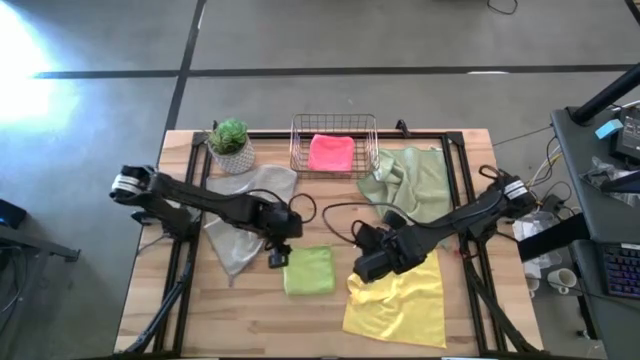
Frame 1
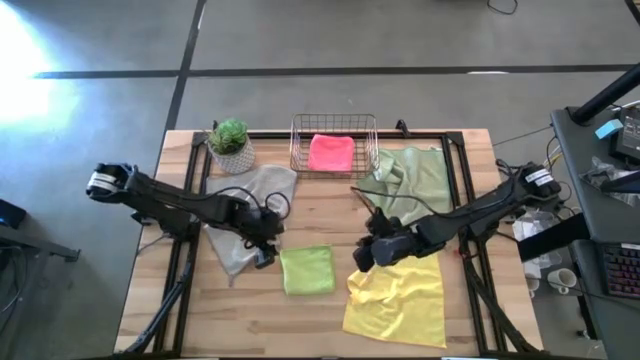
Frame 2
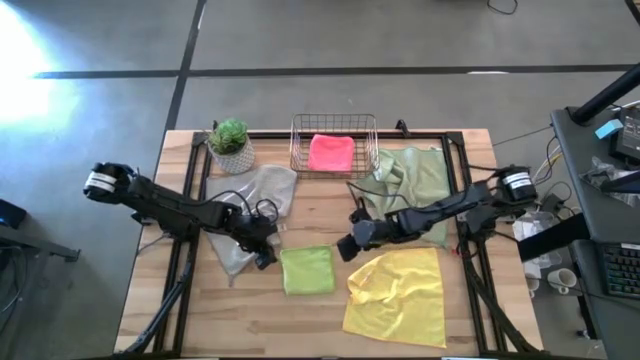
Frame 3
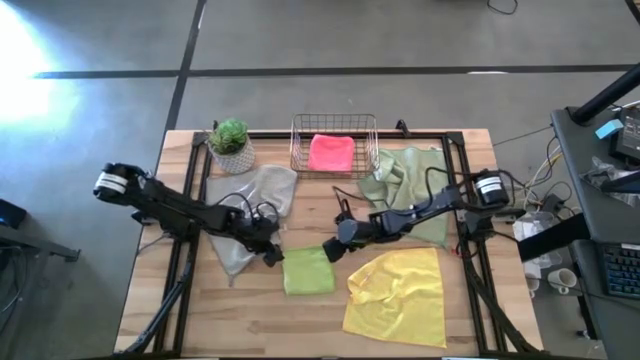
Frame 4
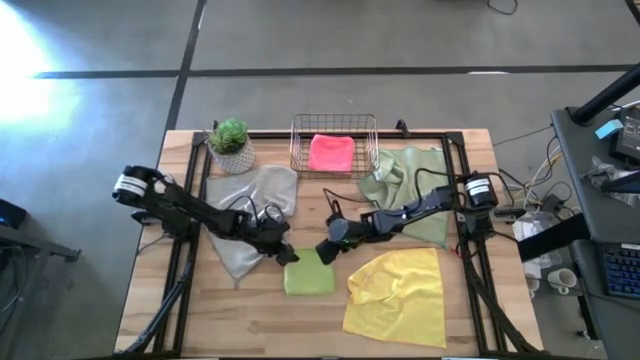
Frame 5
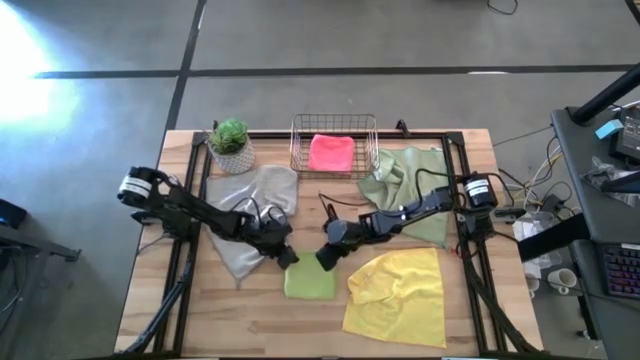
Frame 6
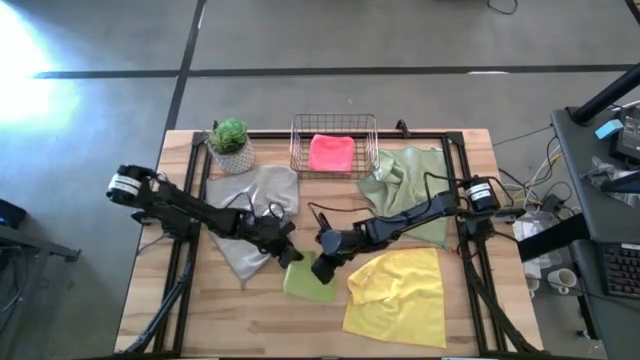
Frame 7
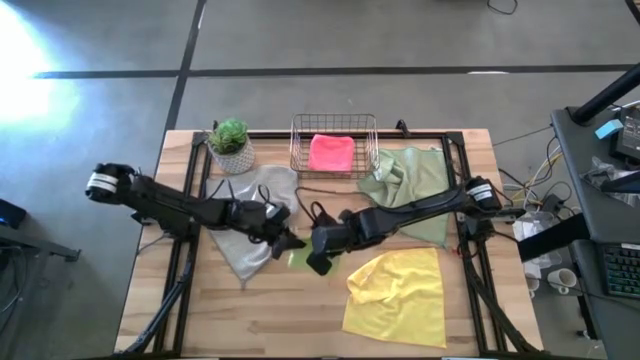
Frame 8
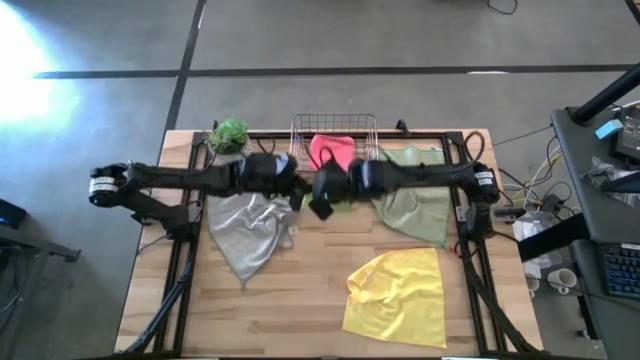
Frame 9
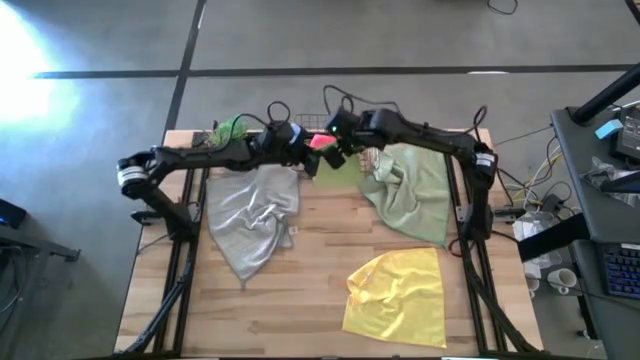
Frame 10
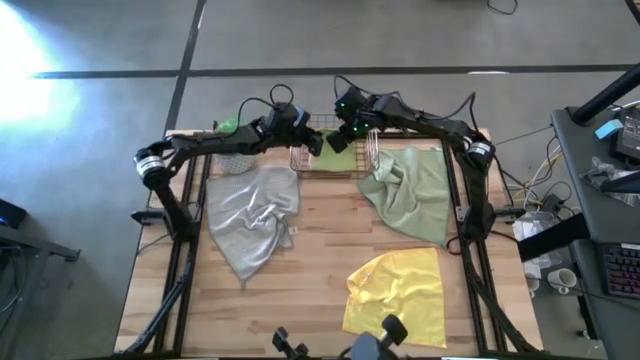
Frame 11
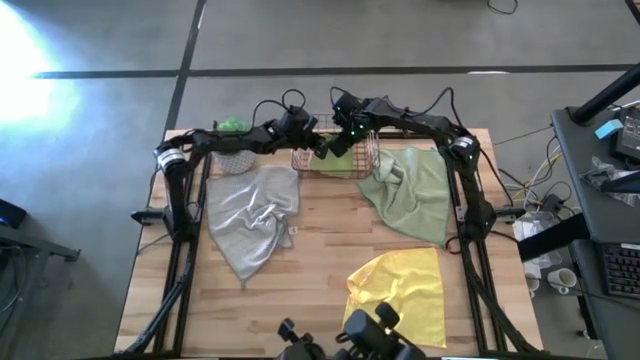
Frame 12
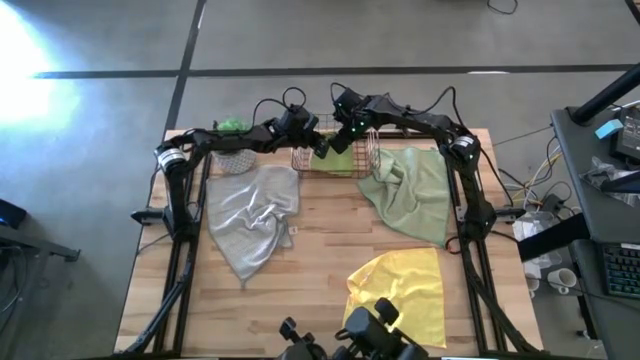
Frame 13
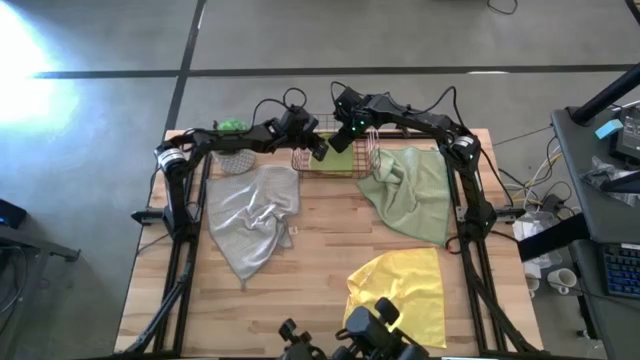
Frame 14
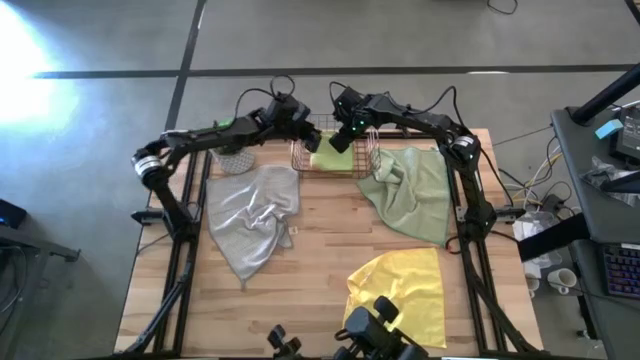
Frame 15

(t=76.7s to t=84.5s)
Task: Fold microfiber towels
Put the folded light green towel into the wire basket

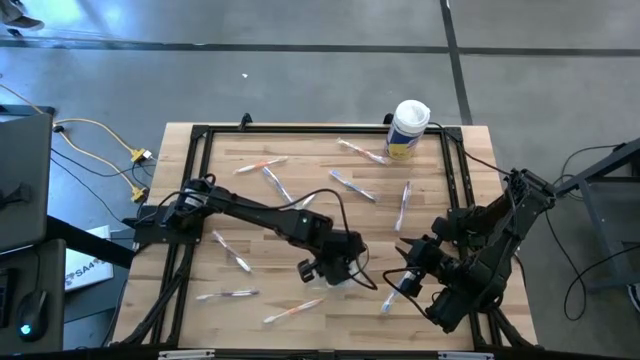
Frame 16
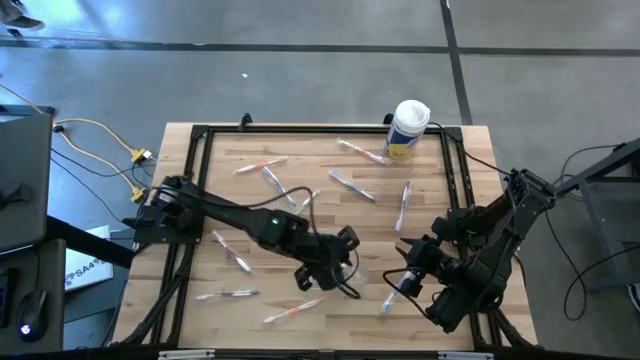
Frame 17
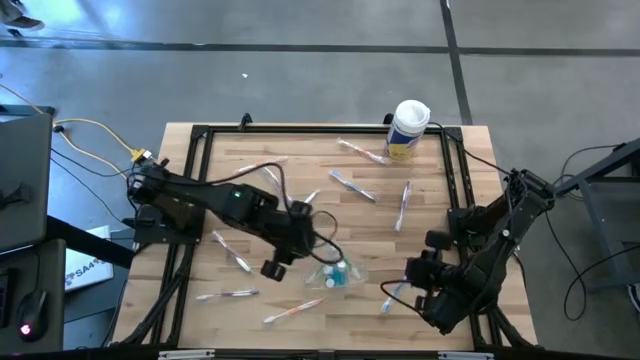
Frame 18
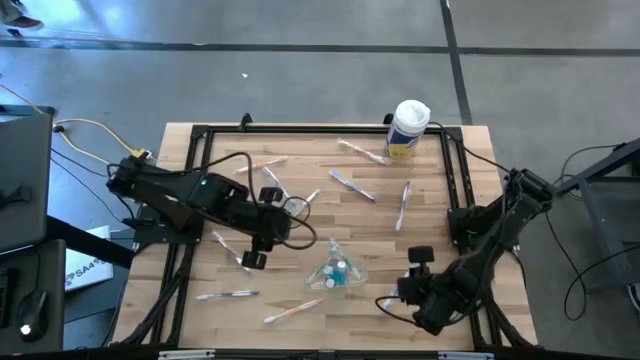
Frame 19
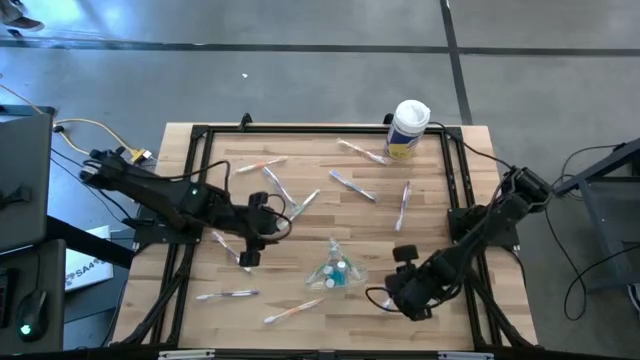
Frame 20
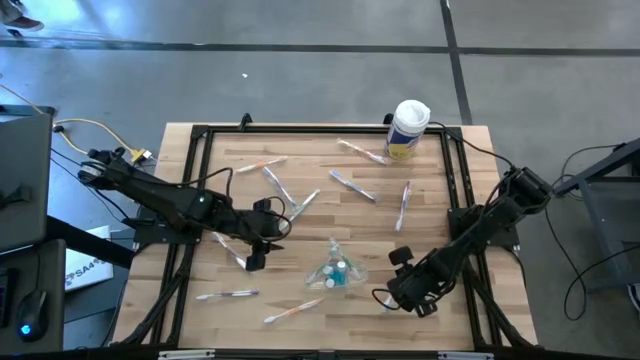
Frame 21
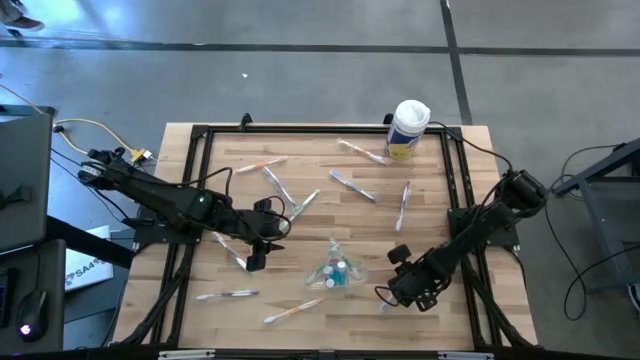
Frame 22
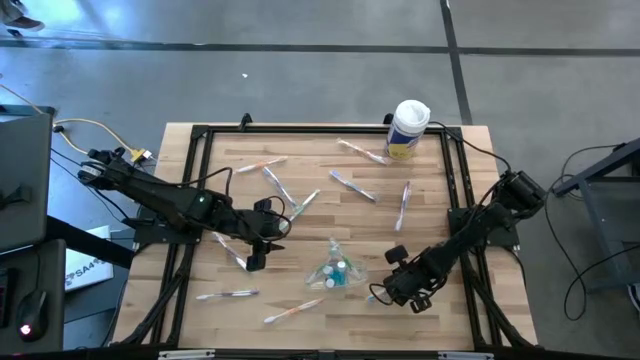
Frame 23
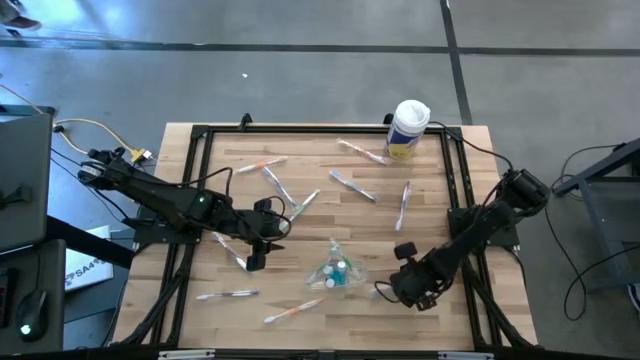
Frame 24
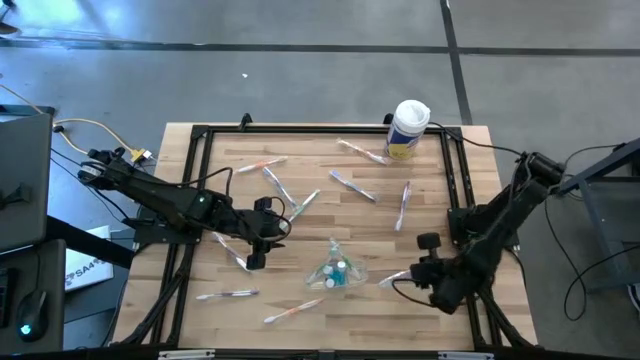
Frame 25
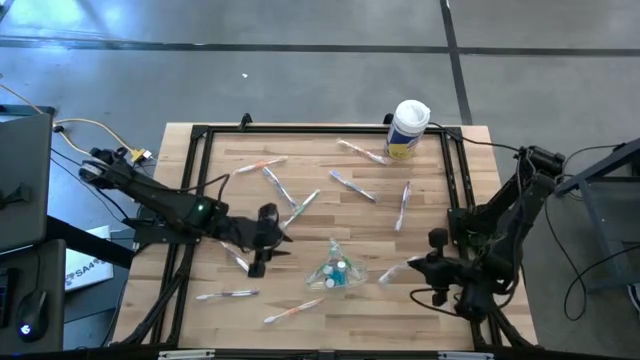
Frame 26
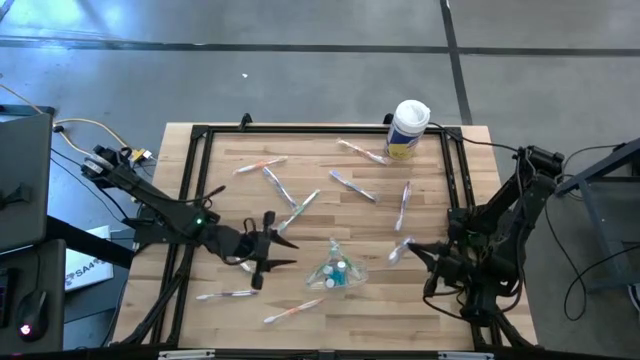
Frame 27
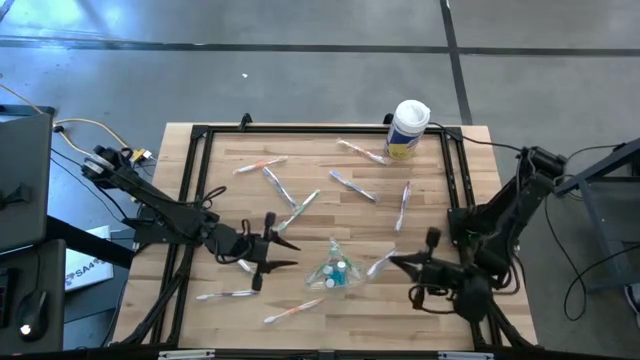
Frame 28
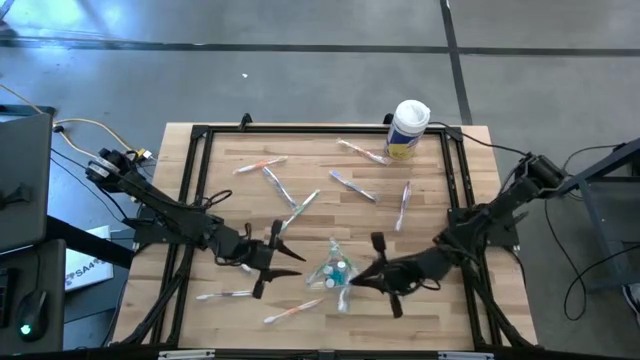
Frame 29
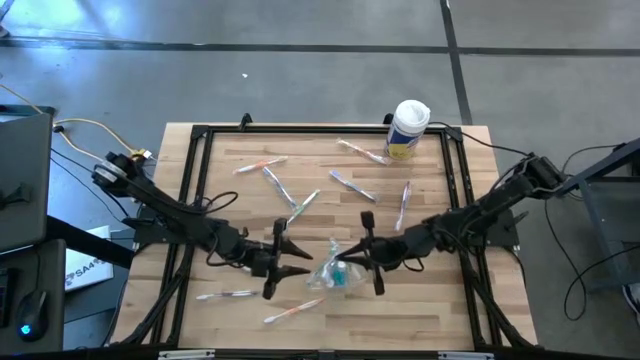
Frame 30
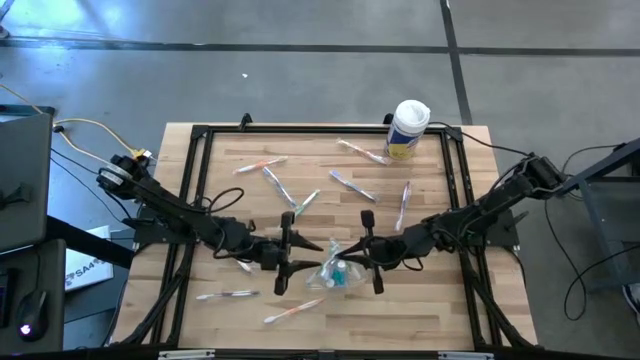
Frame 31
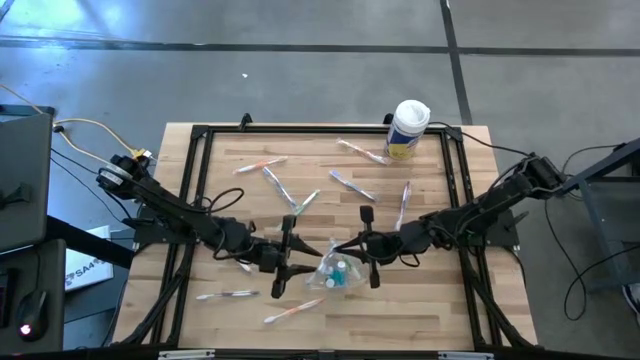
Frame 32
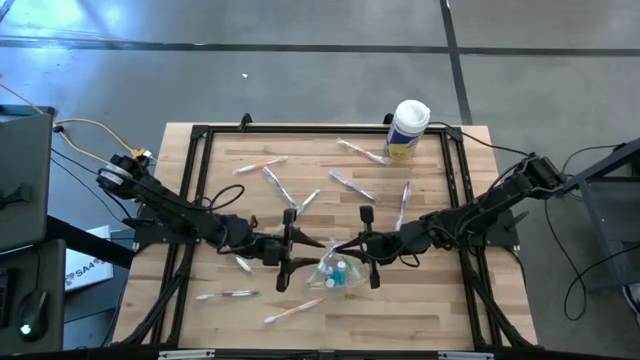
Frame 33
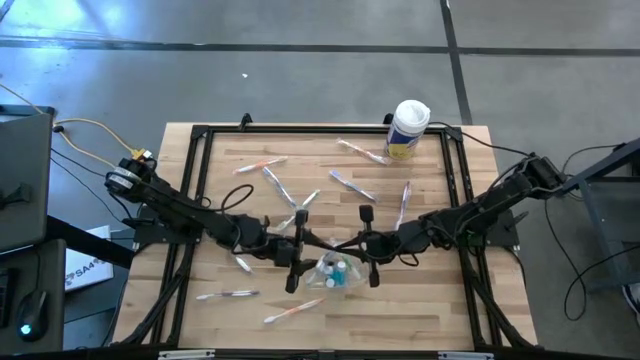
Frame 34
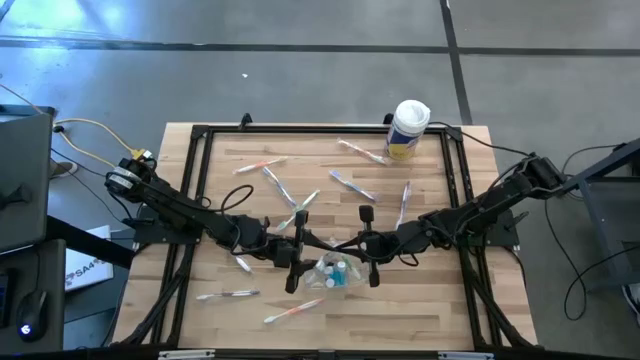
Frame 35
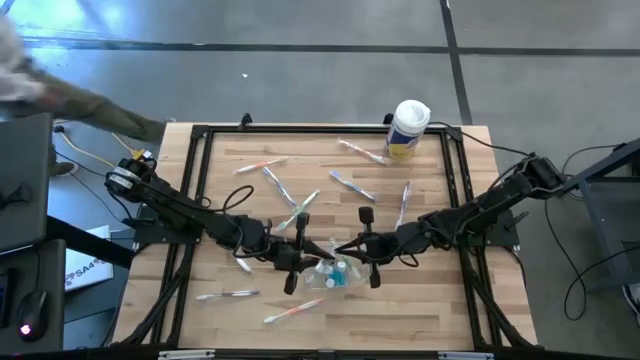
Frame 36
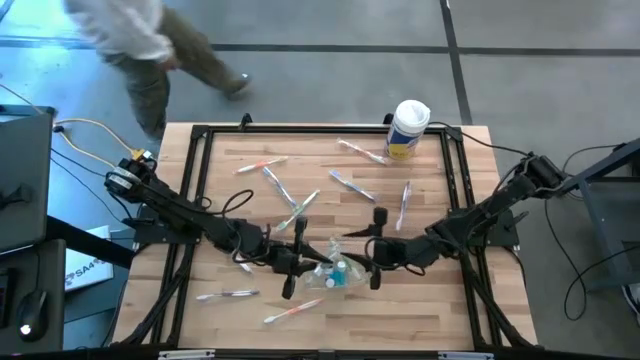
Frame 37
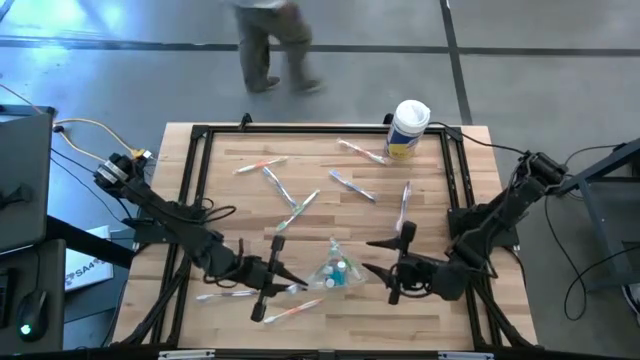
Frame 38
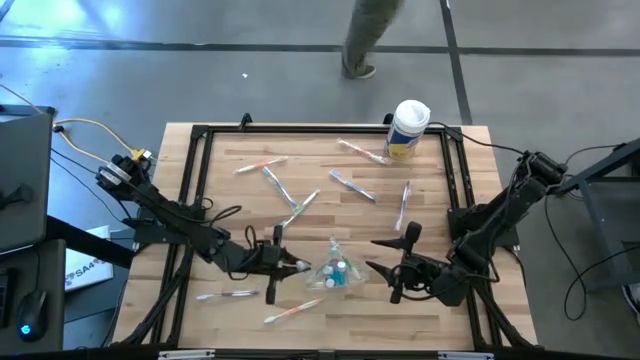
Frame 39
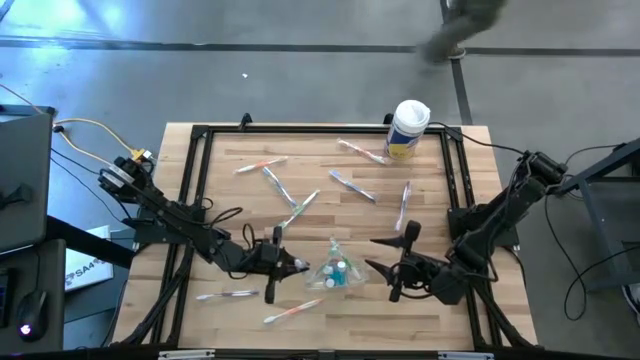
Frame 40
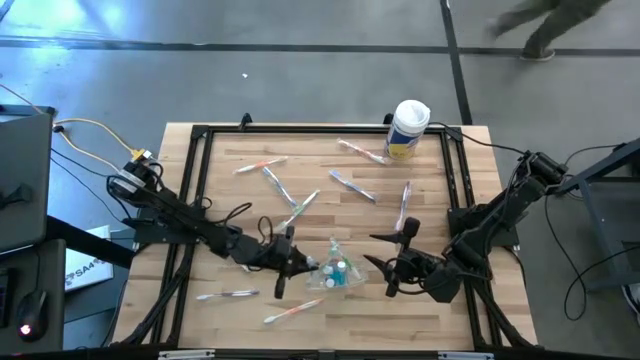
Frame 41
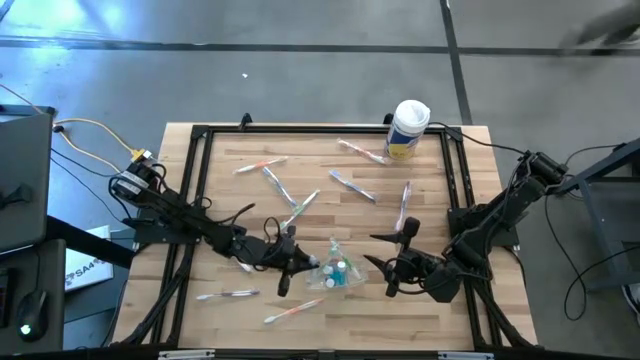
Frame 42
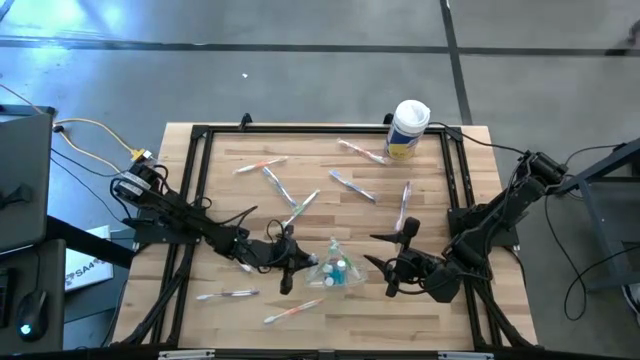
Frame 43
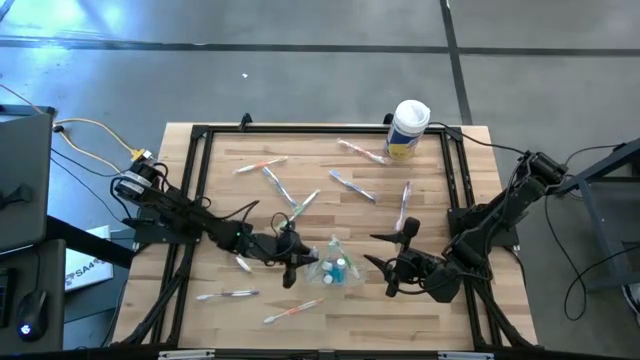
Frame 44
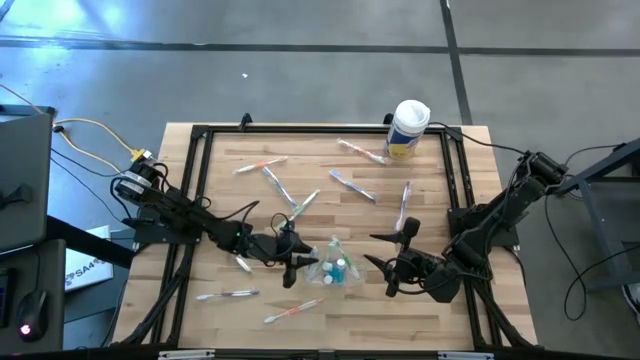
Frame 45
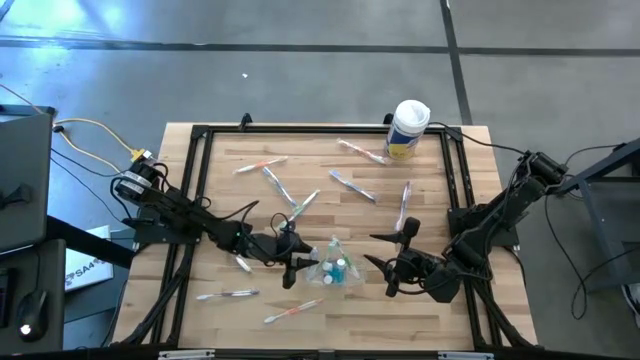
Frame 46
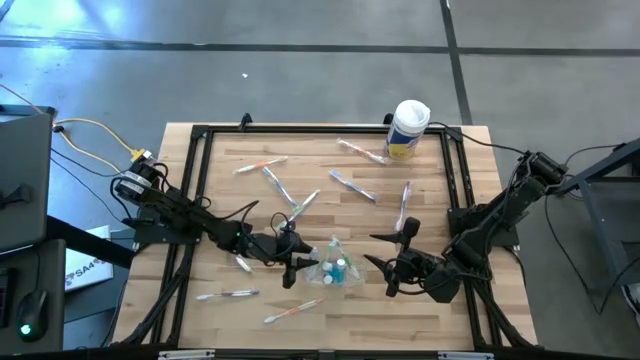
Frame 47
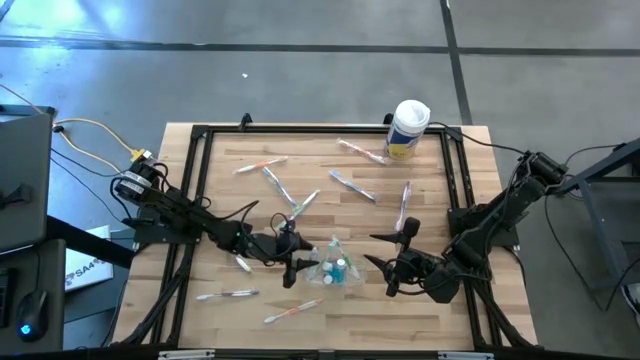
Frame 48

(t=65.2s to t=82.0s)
Task: Pick & Place toothbrushing station
Put the bottom blue toothbrush into the transparent organizer
